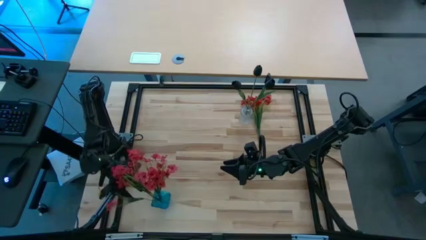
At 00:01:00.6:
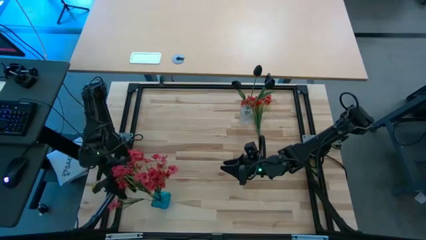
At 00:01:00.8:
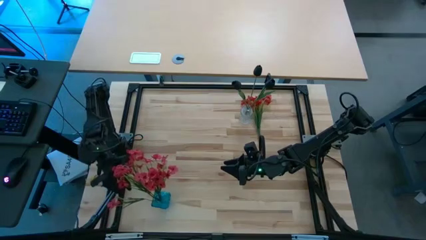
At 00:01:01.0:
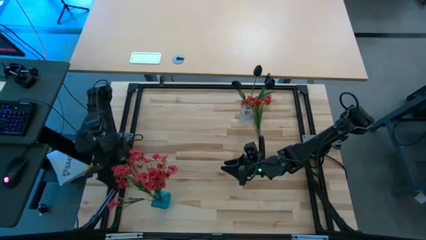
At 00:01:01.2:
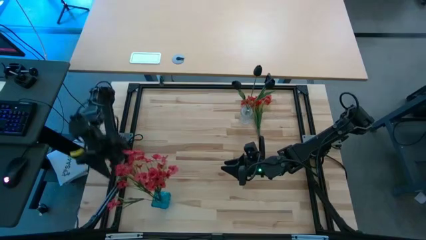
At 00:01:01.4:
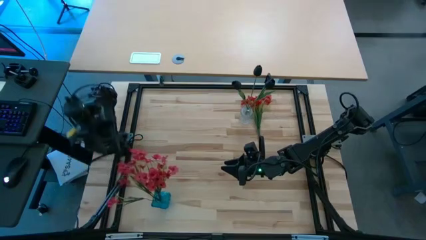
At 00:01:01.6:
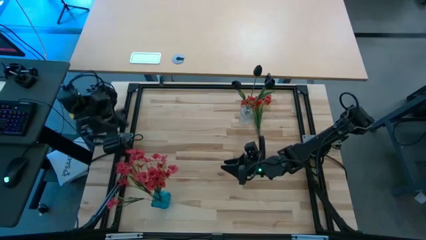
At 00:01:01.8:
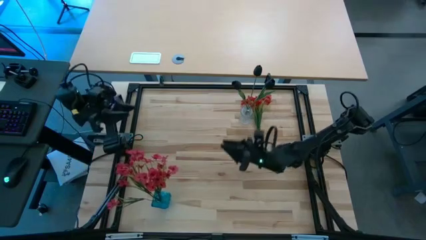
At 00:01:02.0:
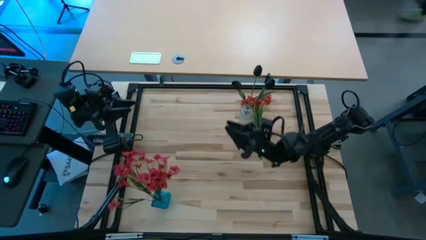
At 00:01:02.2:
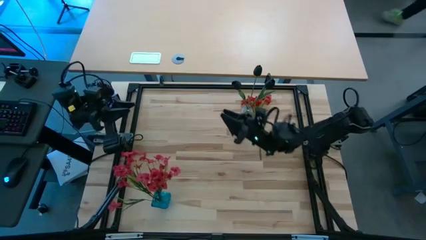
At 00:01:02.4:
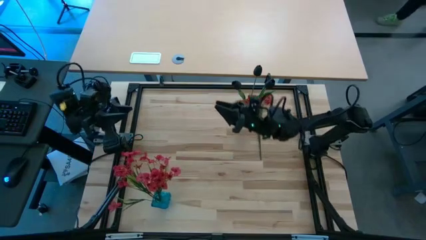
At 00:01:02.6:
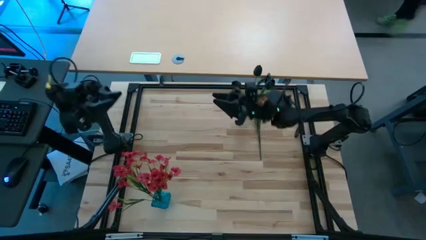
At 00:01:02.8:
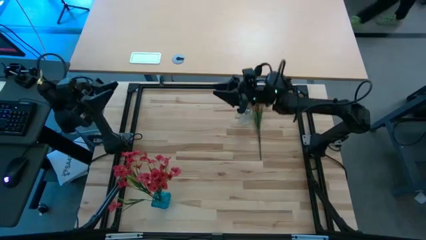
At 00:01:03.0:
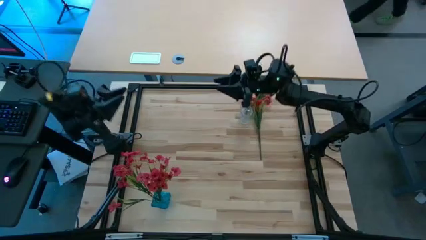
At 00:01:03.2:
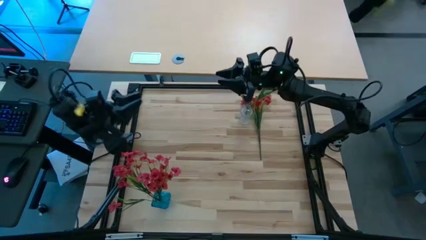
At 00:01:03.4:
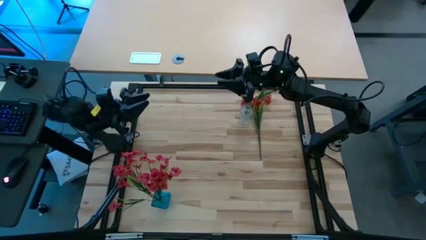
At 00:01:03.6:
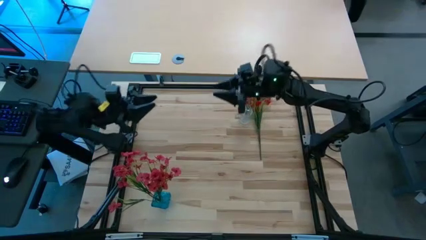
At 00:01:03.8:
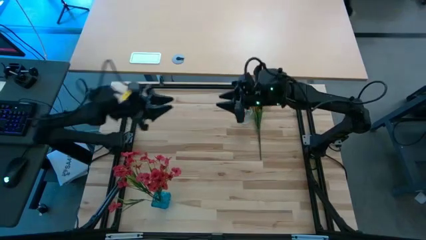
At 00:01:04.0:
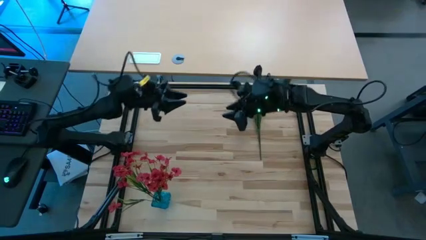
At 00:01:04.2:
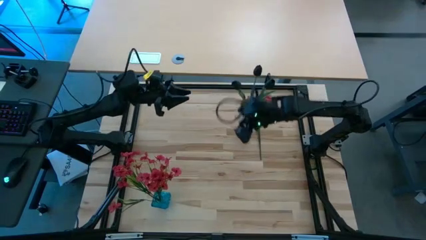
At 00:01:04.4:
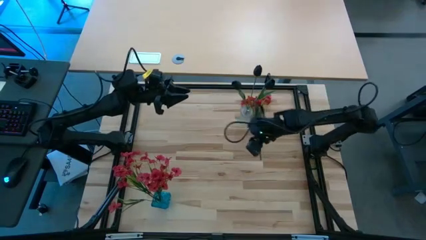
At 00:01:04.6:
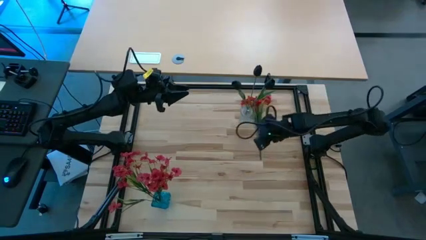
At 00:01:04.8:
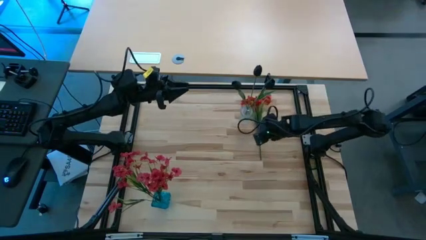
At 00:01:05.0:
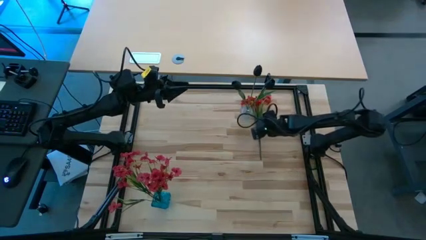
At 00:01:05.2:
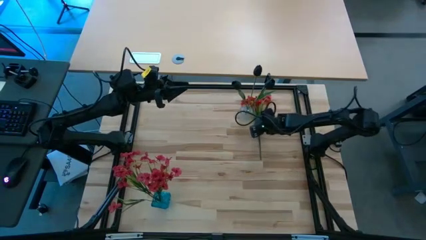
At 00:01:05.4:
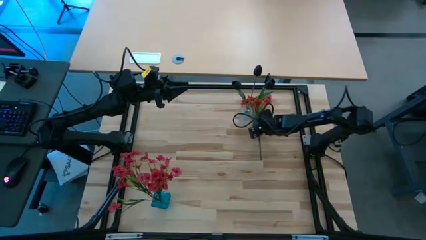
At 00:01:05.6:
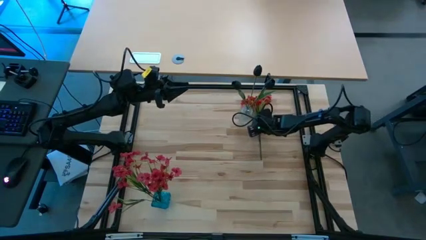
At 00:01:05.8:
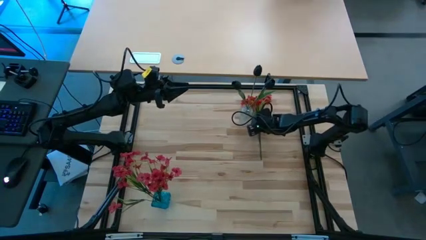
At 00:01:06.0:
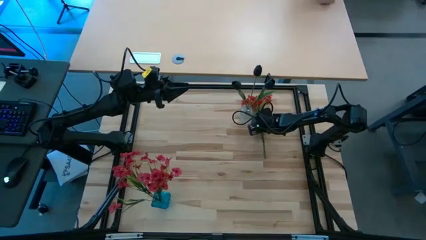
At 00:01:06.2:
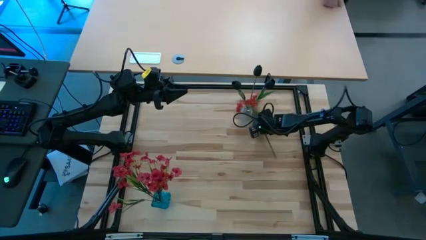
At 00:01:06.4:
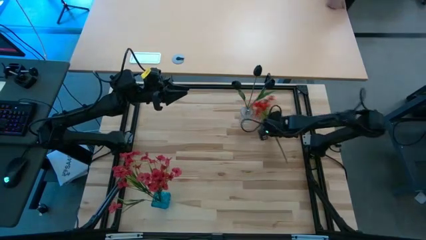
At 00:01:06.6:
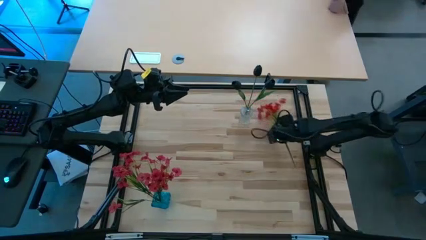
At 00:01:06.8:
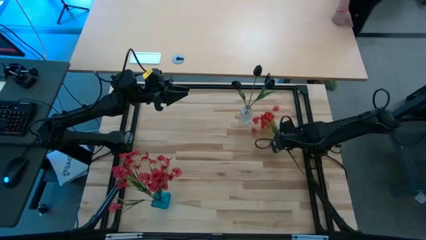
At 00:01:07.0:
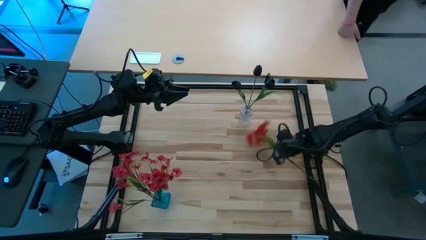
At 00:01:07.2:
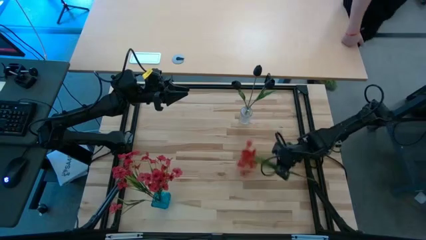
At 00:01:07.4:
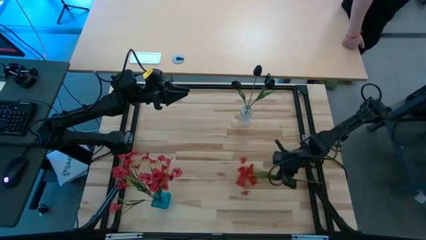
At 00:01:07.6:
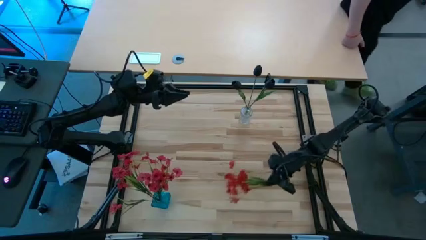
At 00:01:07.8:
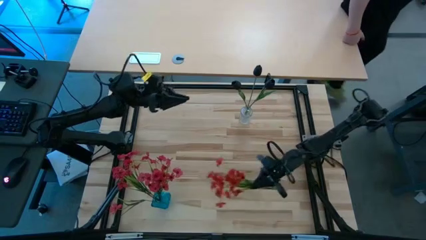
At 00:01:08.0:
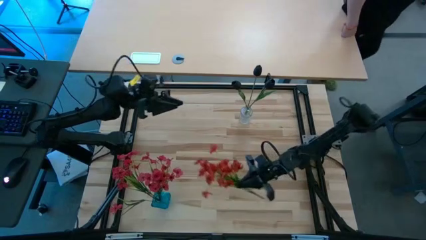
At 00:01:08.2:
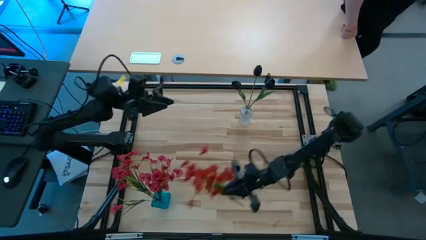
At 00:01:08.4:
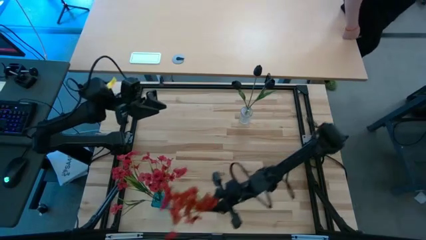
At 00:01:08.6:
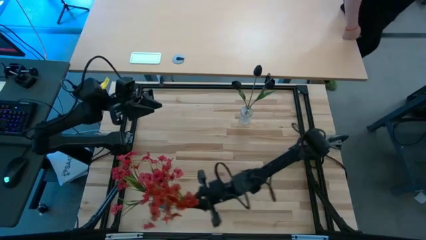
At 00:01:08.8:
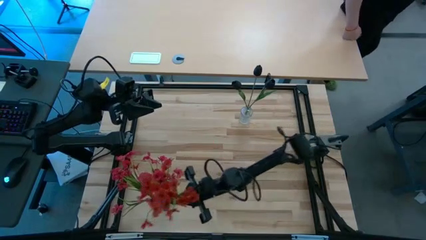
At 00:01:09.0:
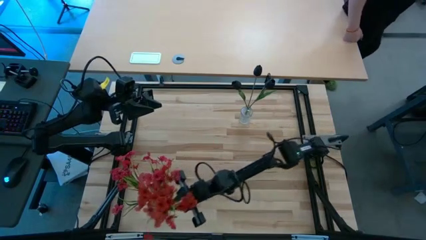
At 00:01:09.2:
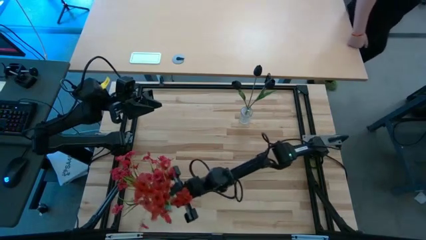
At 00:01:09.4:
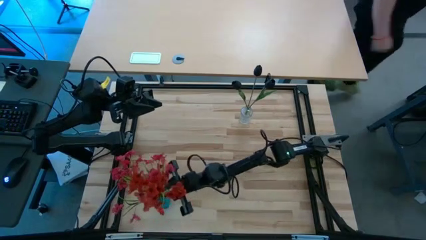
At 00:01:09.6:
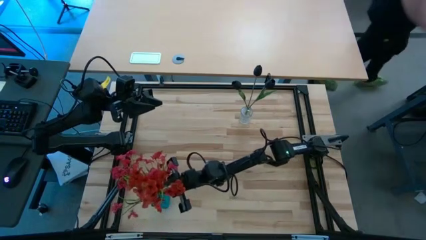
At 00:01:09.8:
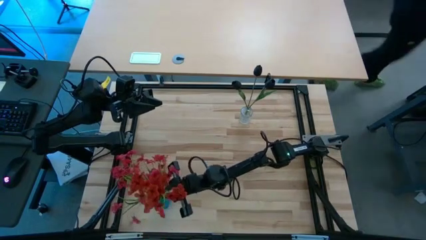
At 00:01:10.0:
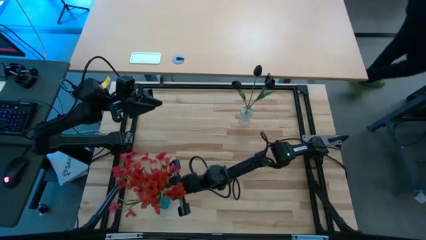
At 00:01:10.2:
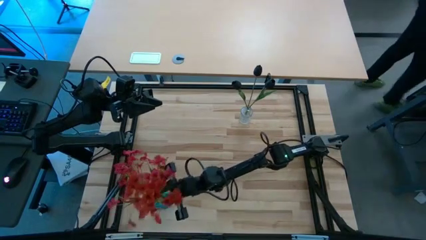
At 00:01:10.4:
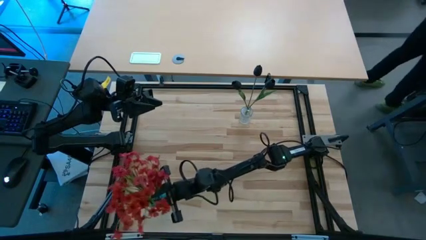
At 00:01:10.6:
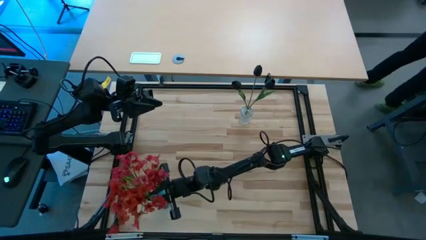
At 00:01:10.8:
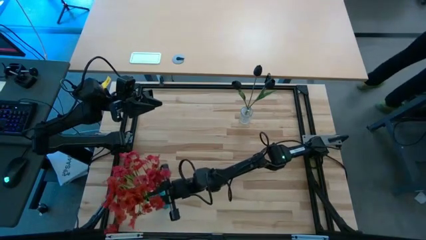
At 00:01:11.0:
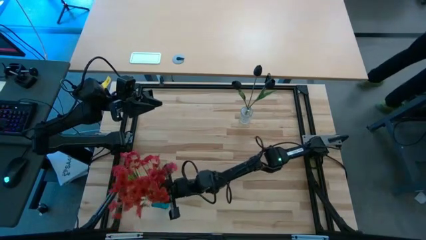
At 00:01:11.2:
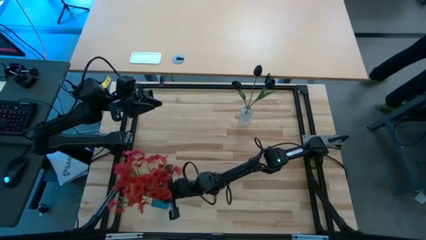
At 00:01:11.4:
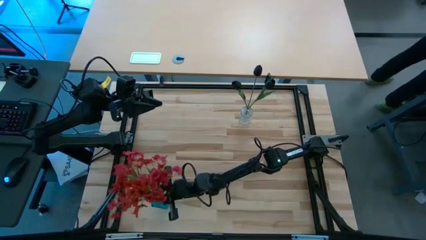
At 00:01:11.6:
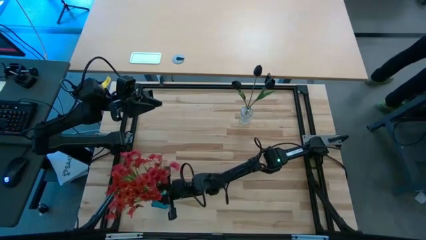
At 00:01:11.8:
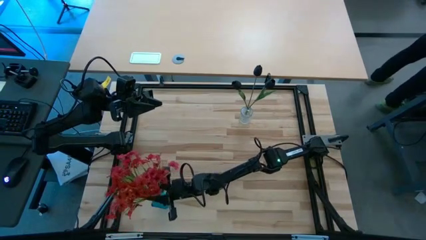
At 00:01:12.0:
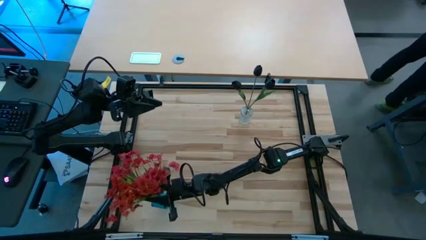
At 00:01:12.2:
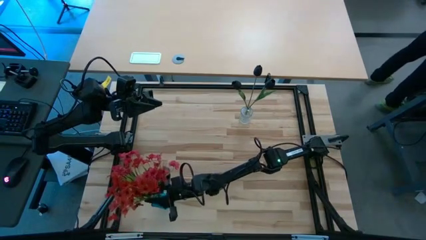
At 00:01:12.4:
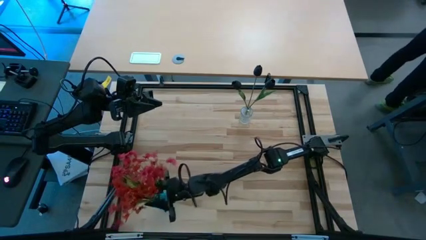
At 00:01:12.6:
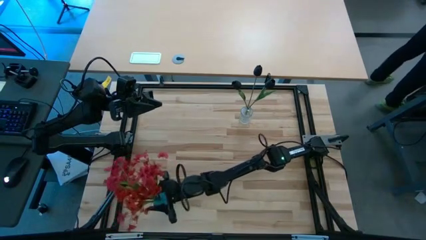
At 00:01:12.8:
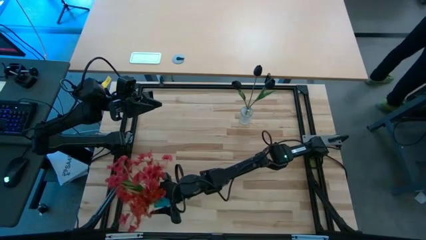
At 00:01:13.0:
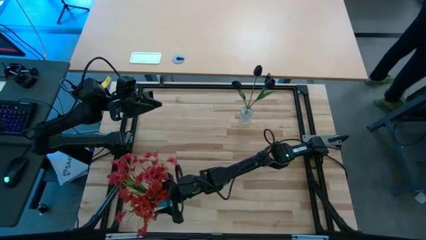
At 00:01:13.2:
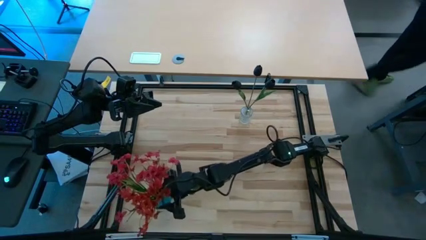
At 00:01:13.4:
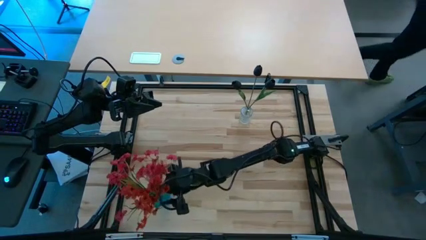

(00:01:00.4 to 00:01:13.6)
Task: Sort flowers into vase by color
Put the red flowers into the blue vase
